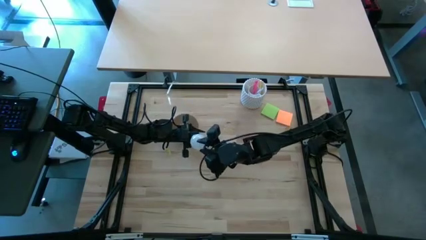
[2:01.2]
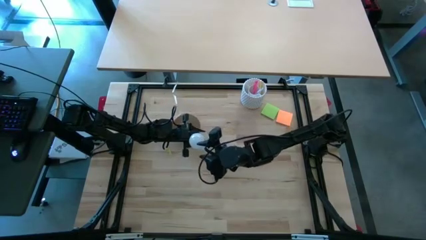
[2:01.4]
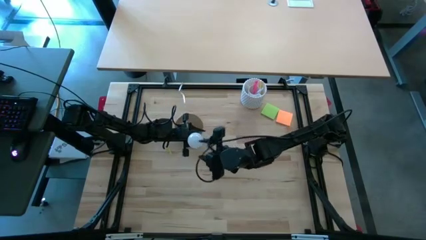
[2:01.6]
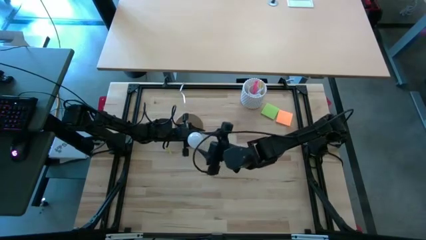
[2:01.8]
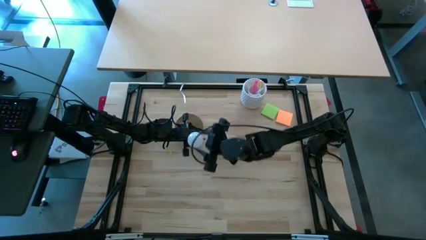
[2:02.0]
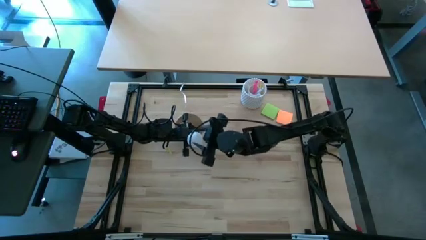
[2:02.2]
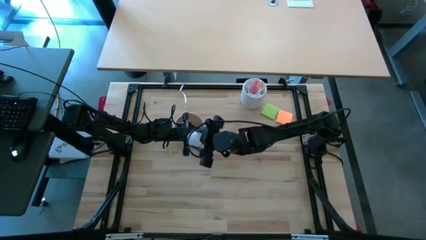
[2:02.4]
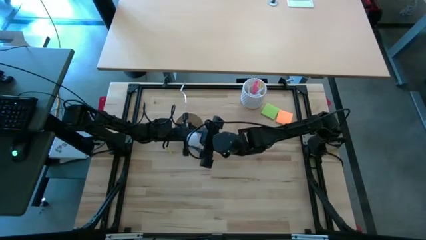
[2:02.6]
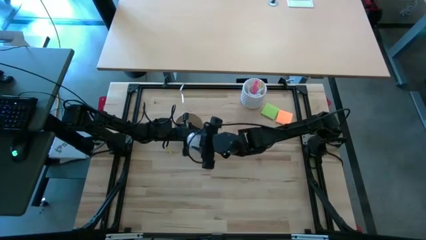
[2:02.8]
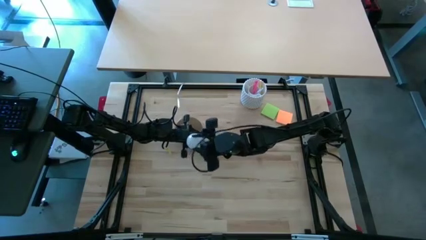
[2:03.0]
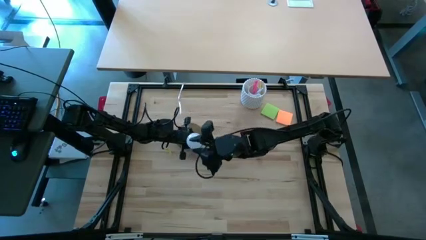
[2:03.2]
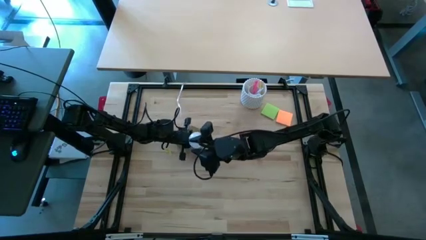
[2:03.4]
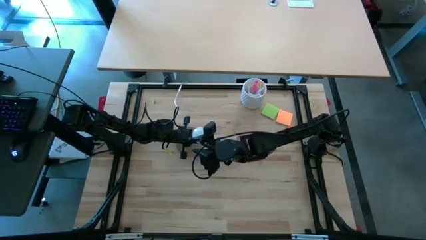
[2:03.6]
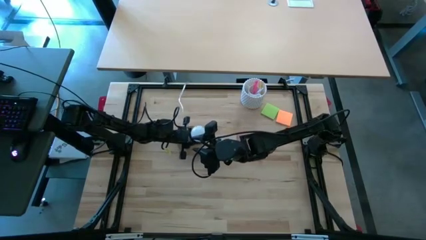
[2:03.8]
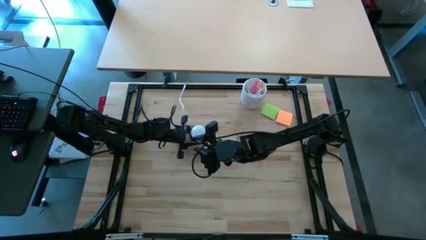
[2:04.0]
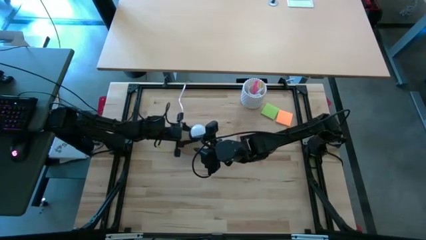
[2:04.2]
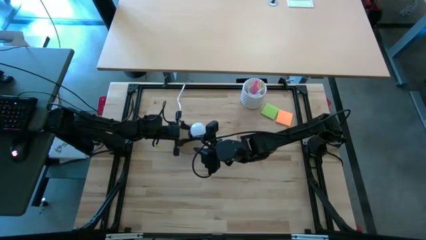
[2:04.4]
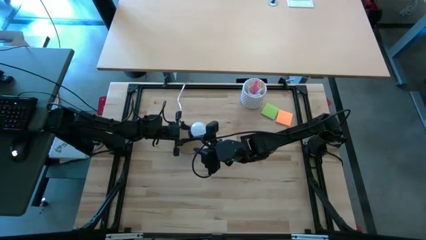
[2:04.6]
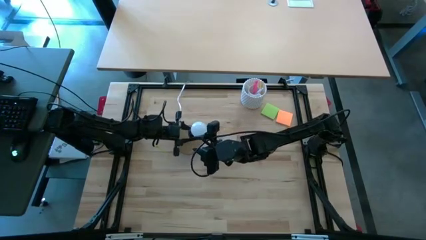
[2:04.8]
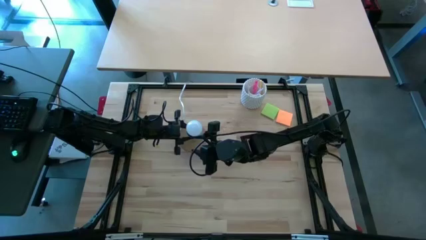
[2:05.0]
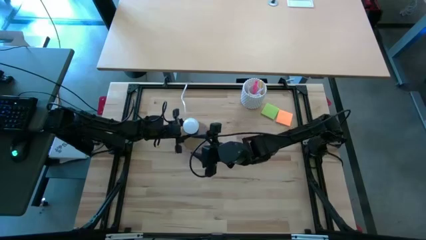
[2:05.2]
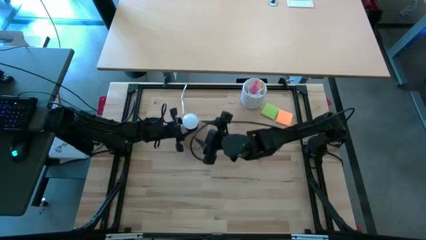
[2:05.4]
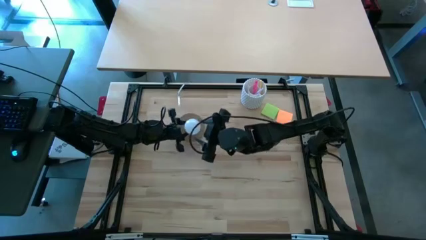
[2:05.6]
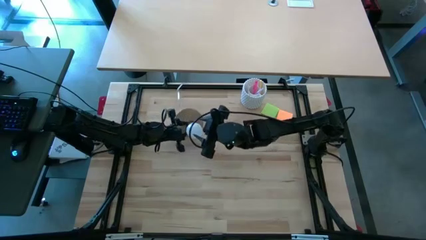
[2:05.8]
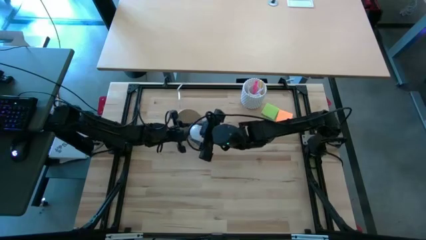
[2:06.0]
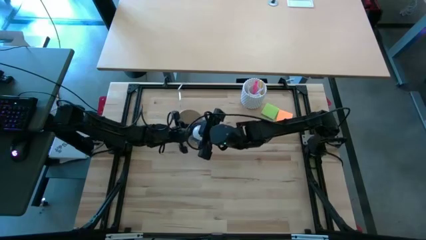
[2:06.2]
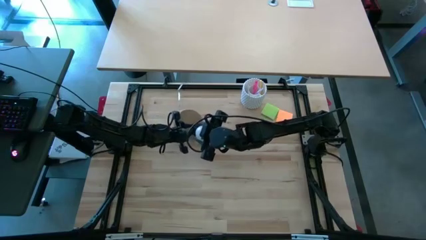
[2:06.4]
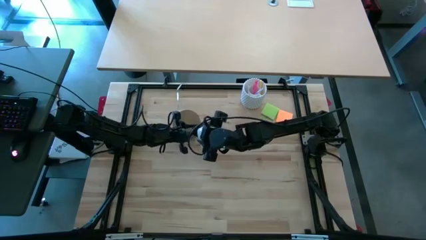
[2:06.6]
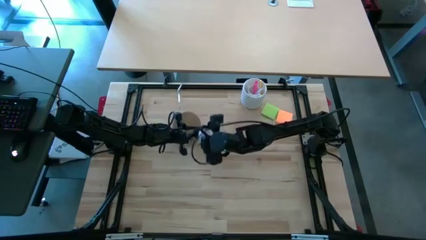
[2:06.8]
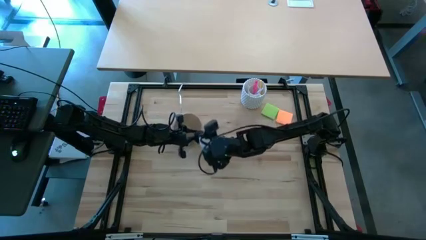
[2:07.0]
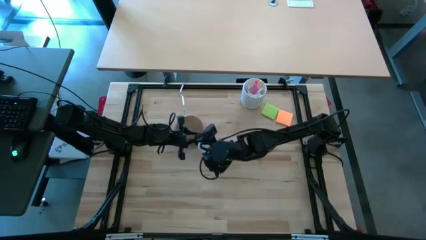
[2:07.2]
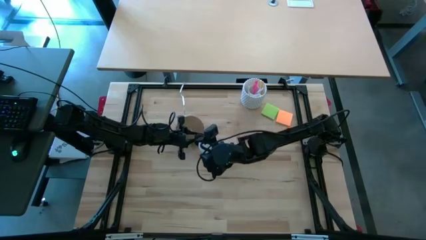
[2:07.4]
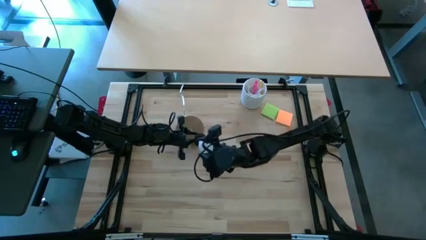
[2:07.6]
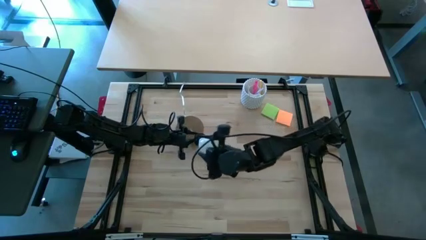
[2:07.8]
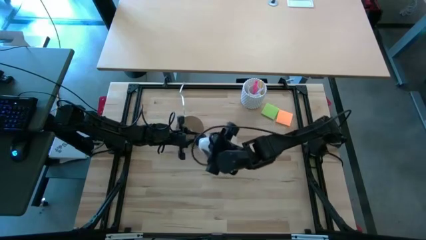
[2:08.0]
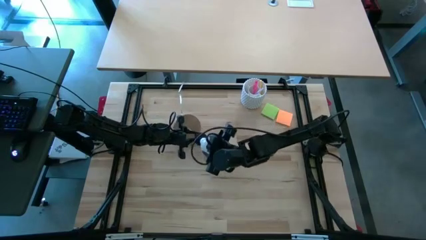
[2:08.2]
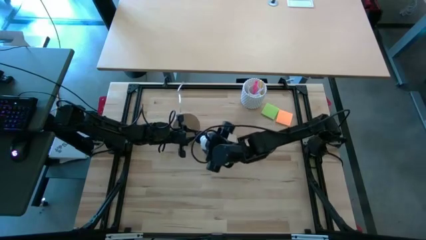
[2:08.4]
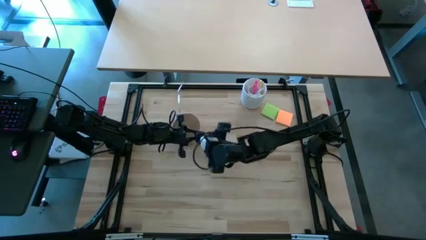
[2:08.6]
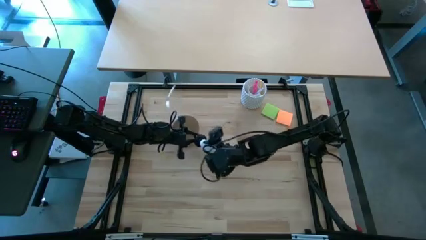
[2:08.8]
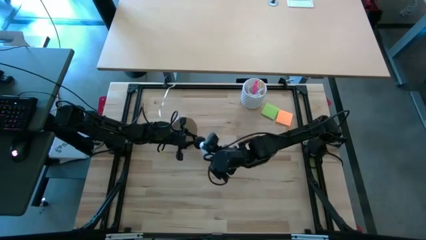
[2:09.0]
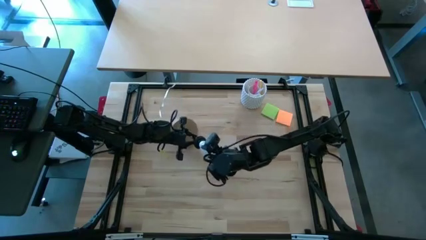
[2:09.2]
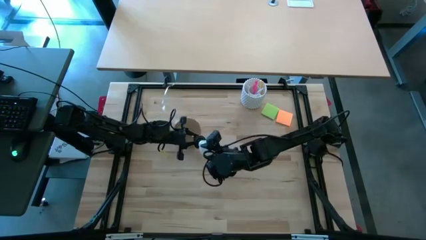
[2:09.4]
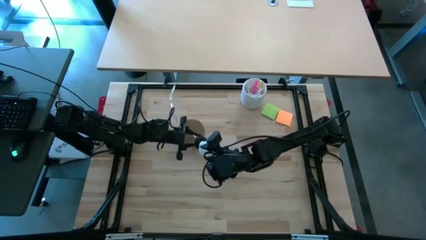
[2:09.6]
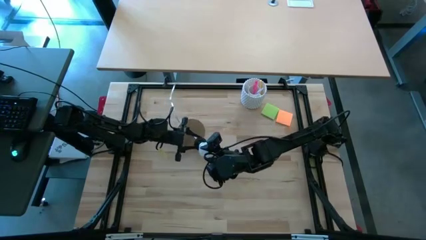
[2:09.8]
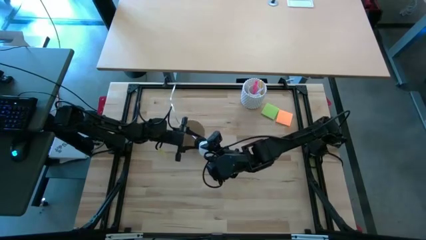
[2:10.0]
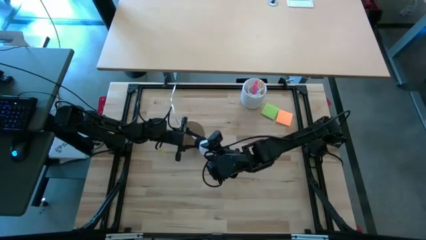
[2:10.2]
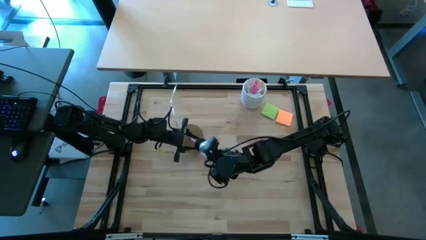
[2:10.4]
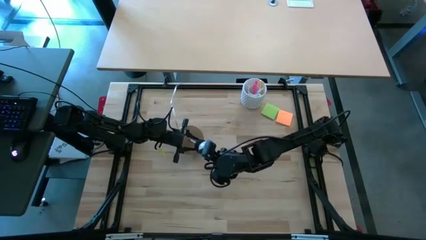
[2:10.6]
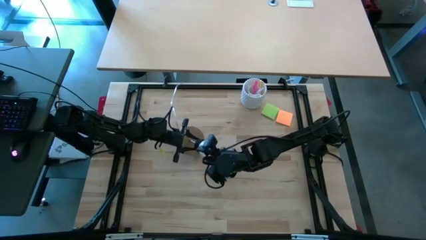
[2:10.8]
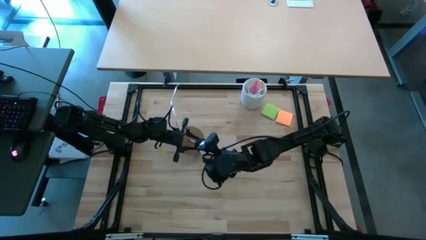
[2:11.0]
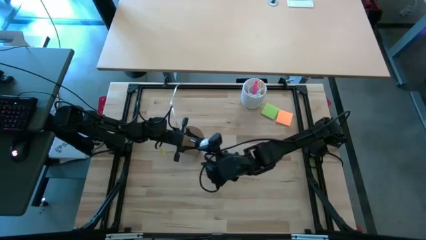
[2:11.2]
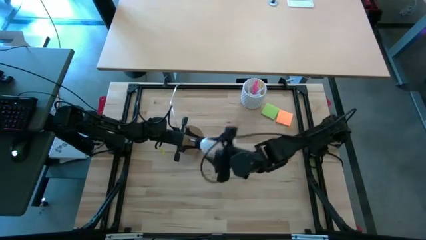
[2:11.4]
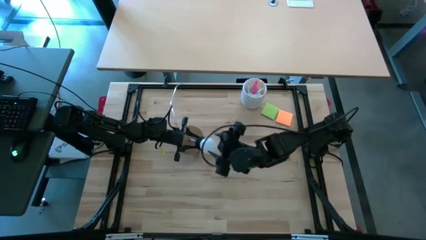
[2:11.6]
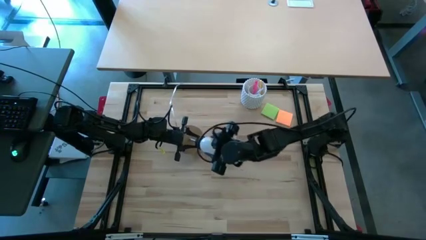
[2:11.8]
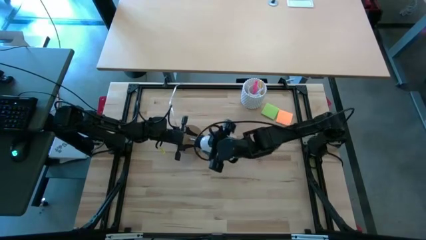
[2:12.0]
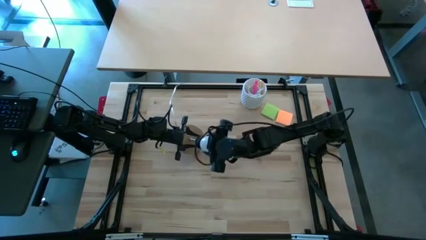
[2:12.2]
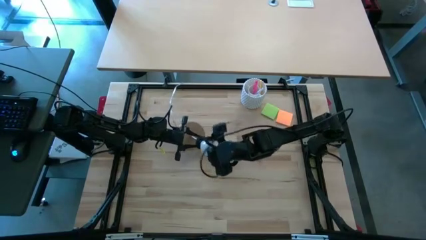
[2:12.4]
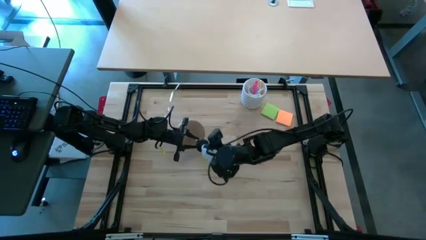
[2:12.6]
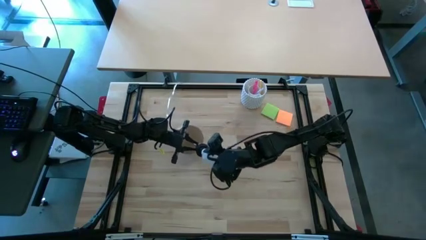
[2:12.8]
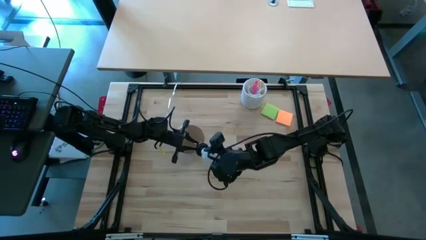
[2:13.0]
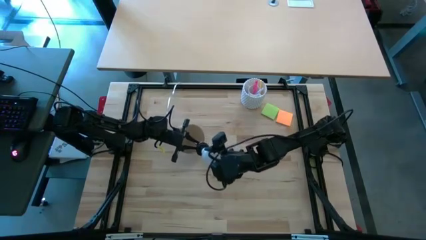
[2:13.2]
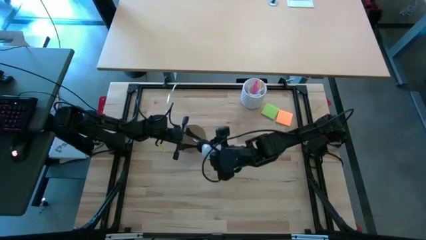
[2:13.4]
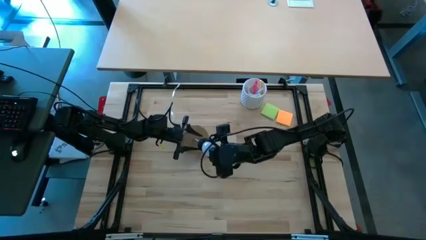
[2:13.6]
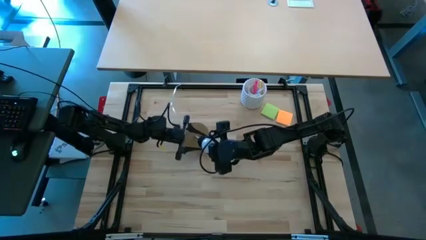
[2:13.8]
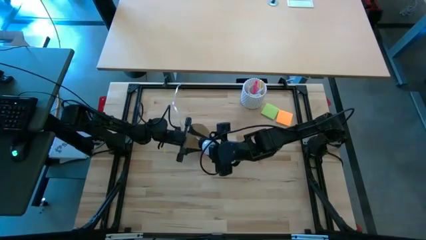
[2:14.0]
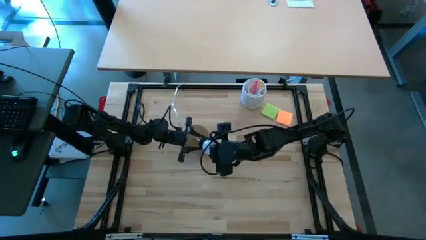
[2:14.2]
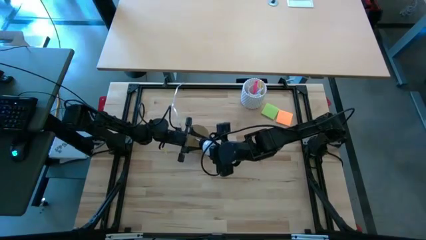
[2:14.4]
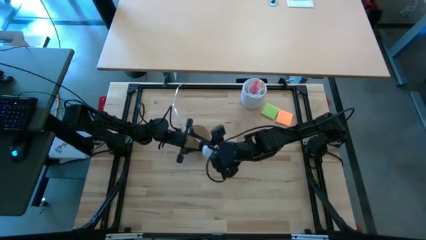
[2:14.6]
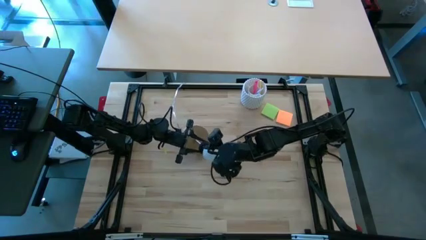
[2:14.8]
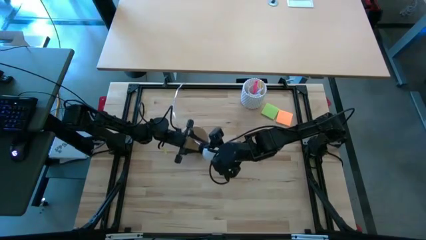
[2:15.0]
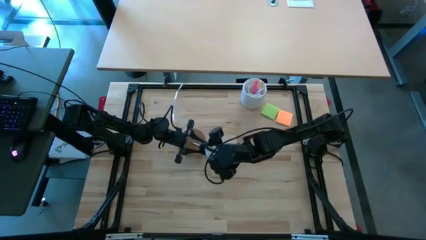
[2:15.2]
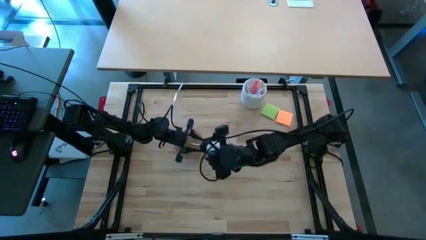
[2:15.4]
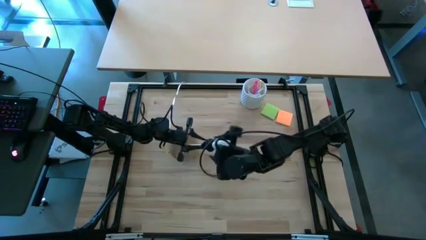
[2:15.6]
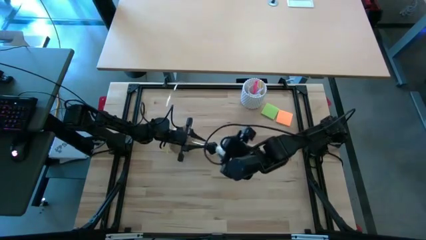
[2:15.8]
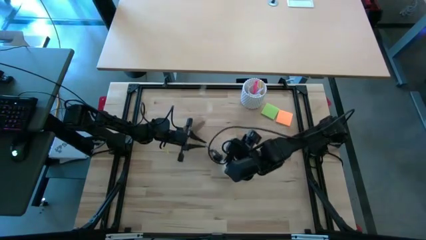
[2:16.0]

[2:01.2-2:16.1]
Task: Screw lightbulb
Remove the white lightbulb from the desk lamp

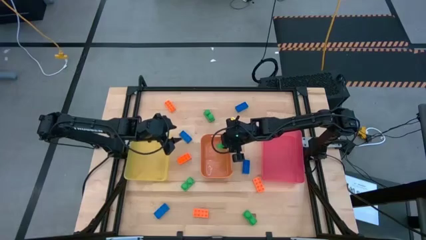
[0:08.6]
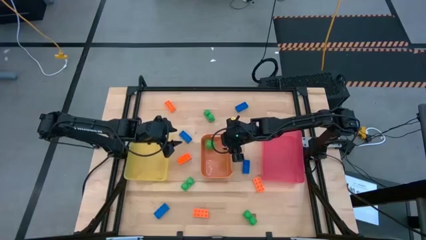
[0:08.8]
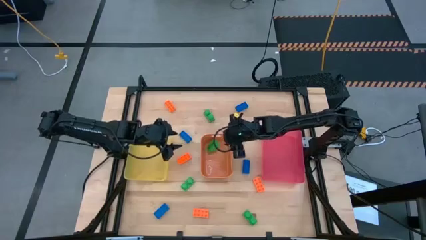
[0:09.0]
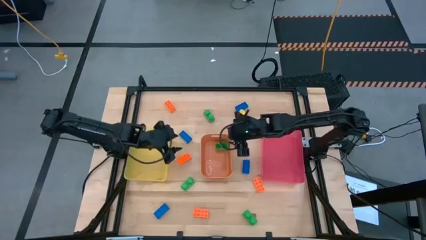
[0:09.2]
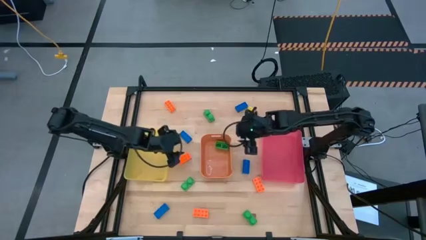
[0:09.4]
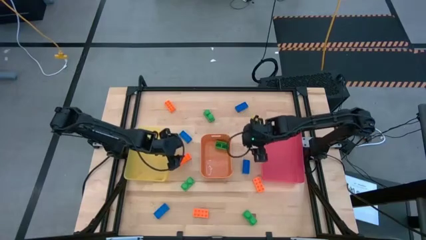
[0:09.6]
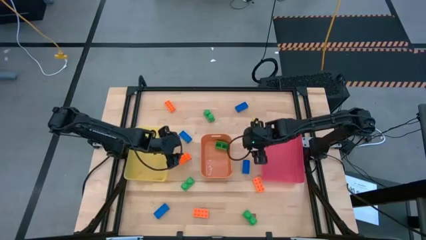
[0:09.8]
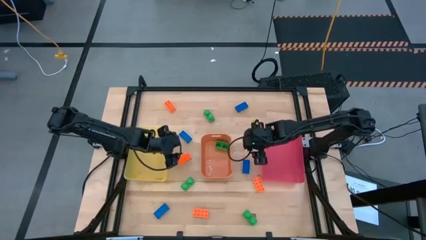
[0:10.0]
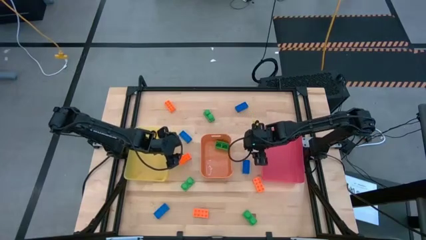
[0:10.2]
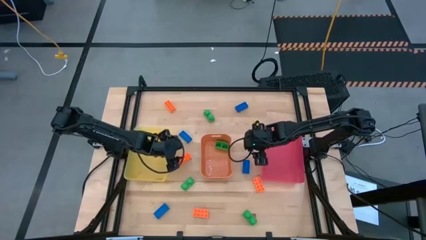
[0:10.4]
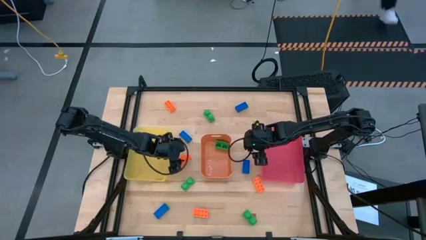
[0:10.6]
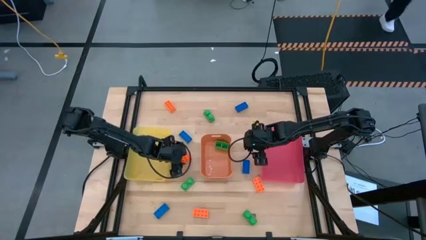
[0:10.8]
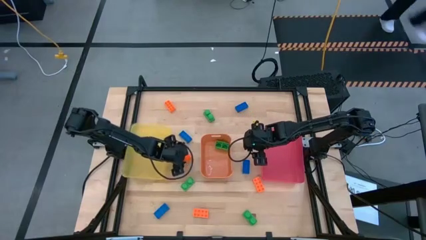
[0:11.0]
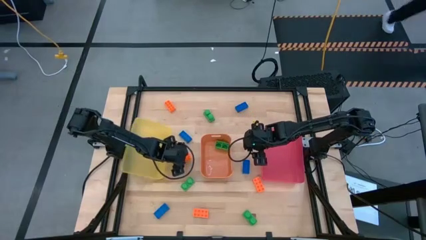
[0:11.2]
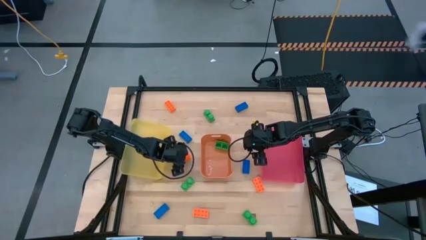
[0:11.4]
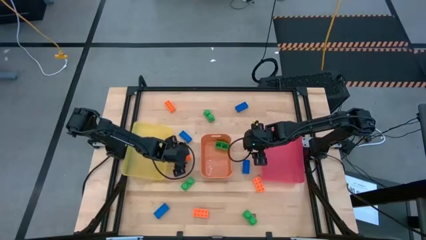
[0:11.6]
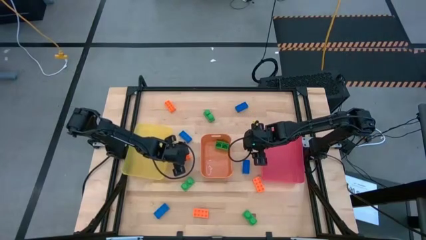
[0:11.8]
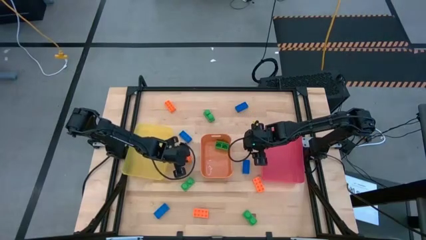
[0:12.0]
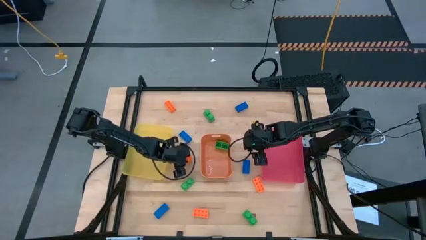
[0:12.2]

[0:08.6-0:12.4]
Task: Sort & place blocks by color
Put the orange game piece into the yellow bin
